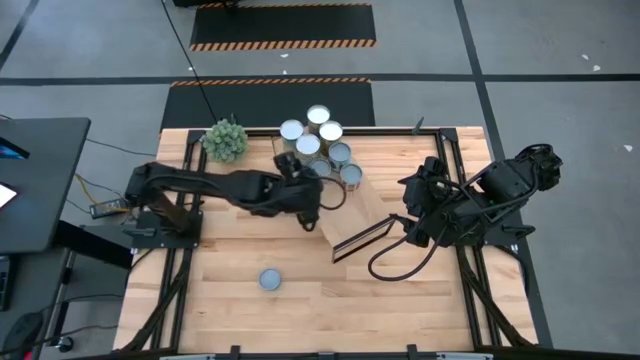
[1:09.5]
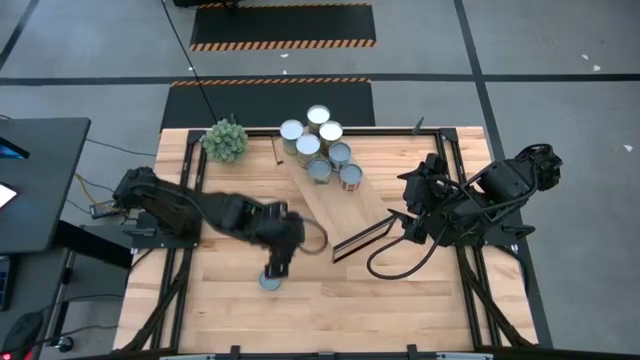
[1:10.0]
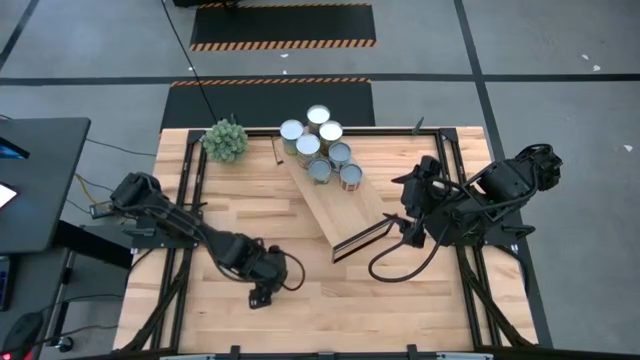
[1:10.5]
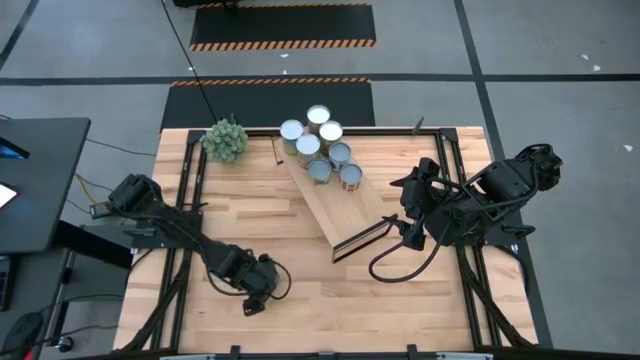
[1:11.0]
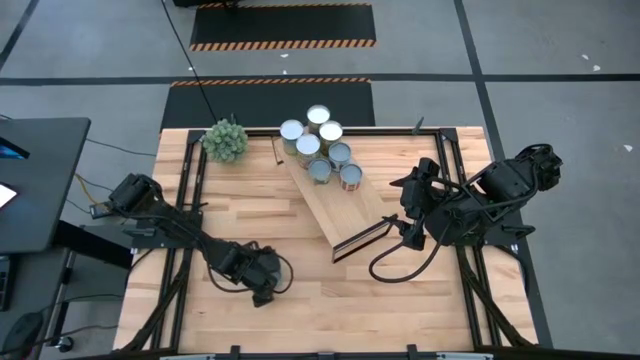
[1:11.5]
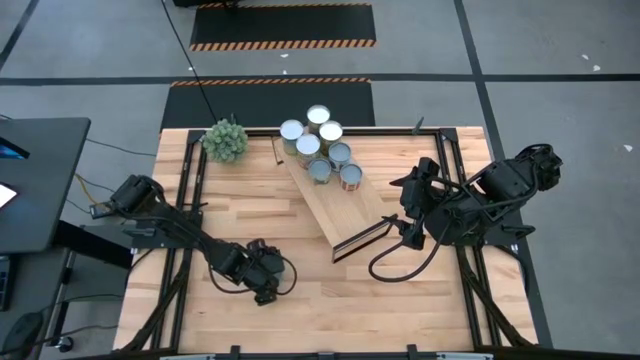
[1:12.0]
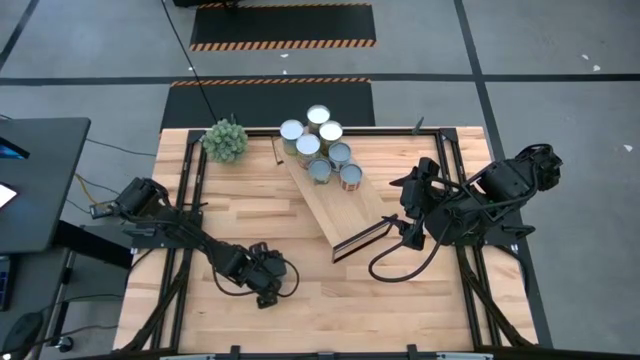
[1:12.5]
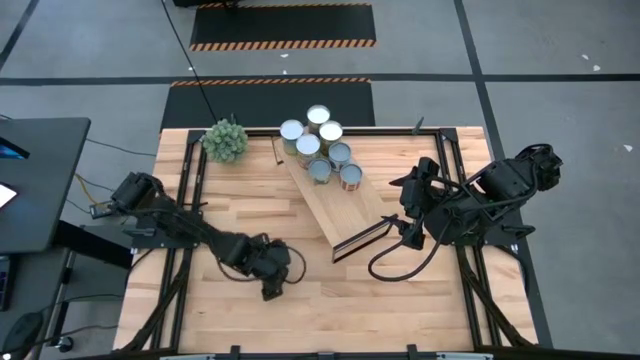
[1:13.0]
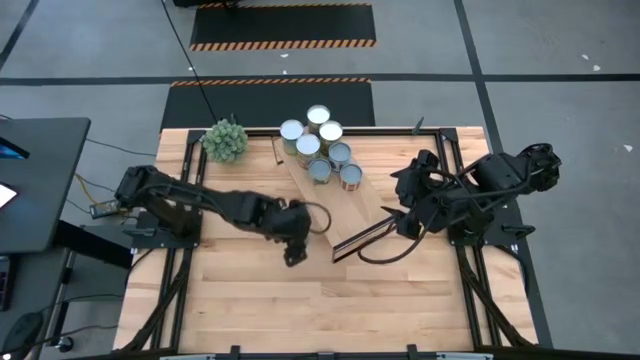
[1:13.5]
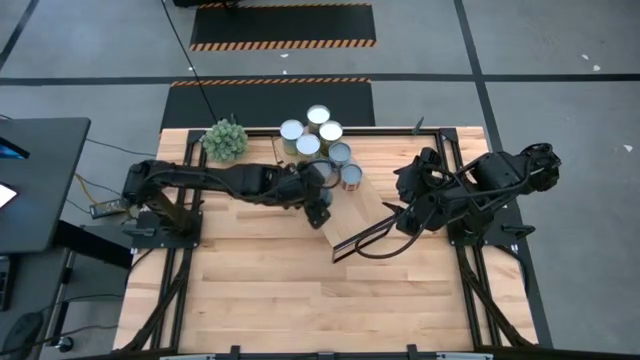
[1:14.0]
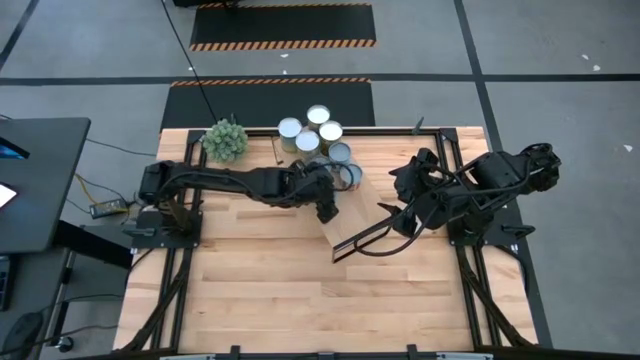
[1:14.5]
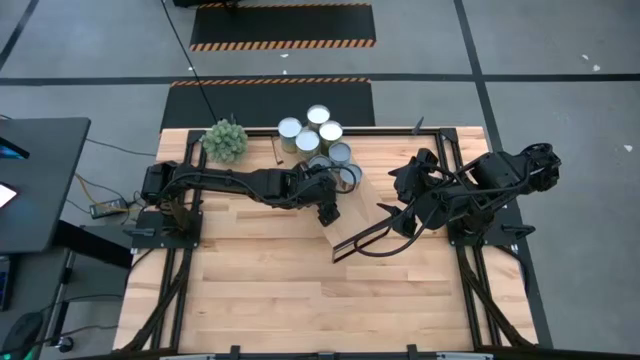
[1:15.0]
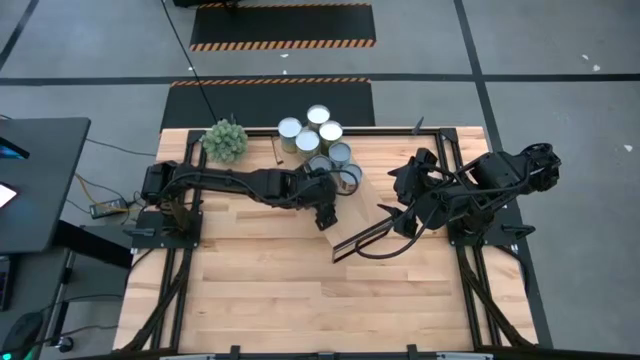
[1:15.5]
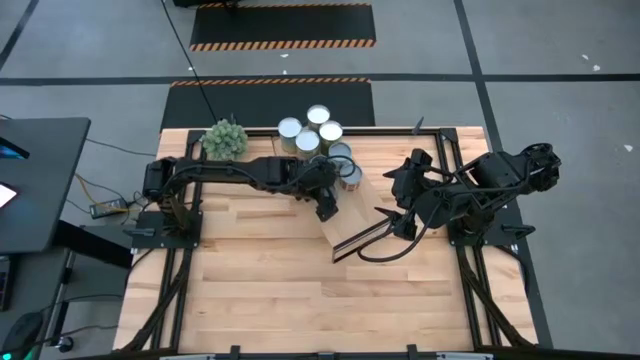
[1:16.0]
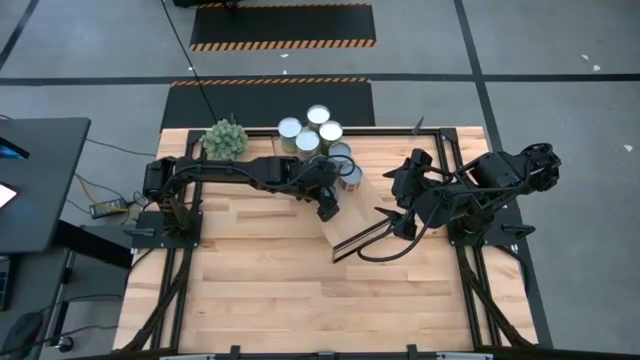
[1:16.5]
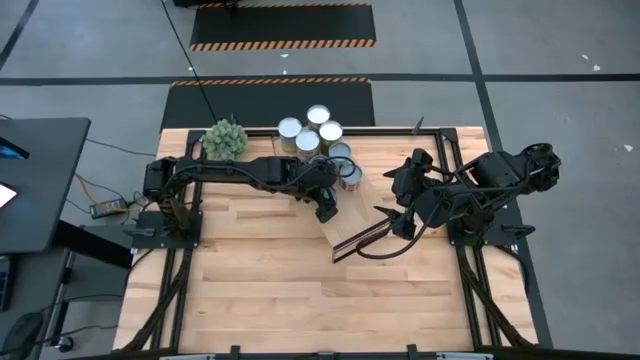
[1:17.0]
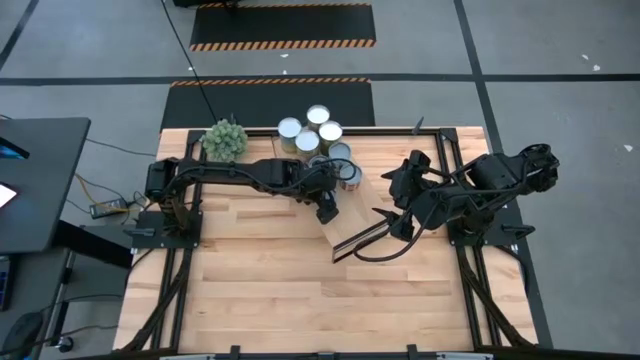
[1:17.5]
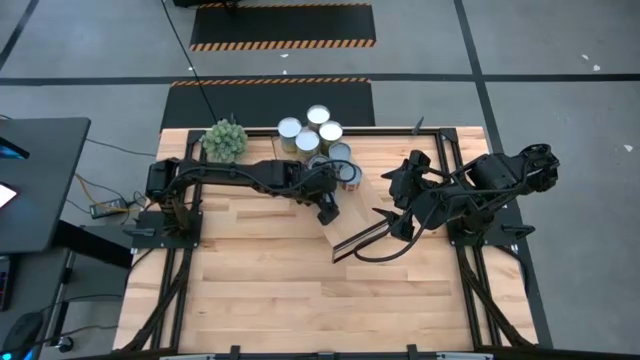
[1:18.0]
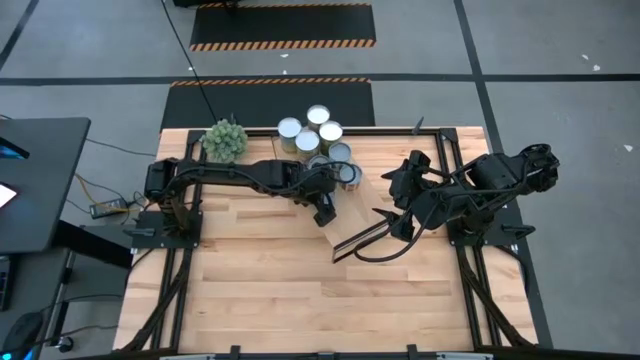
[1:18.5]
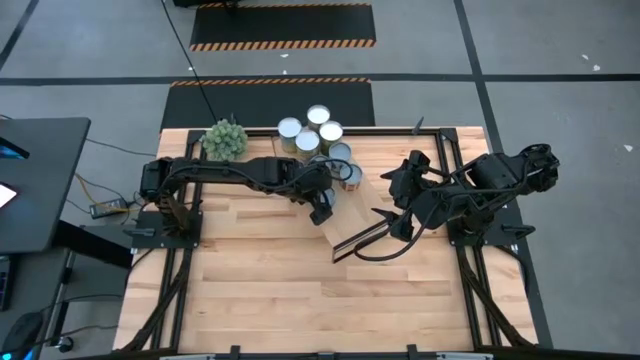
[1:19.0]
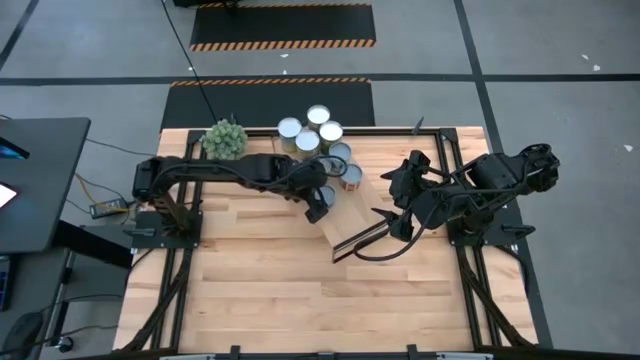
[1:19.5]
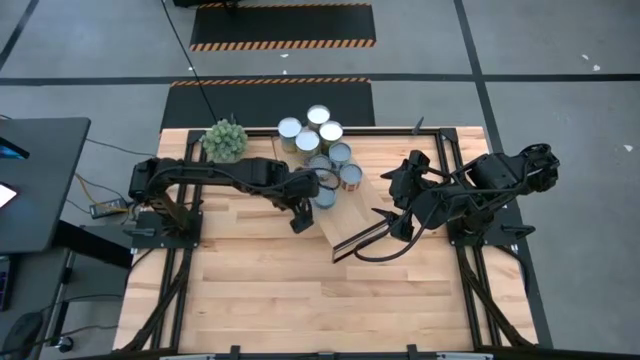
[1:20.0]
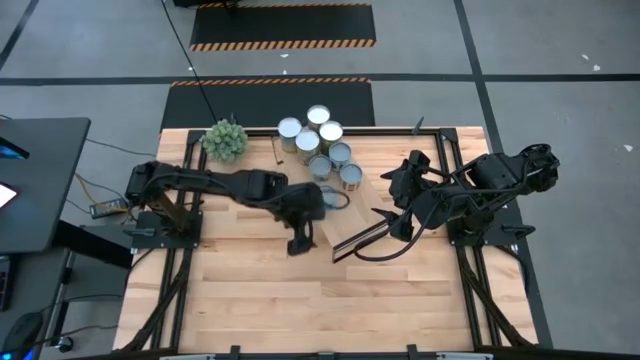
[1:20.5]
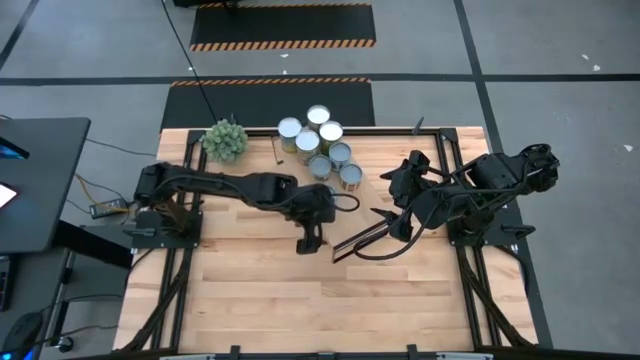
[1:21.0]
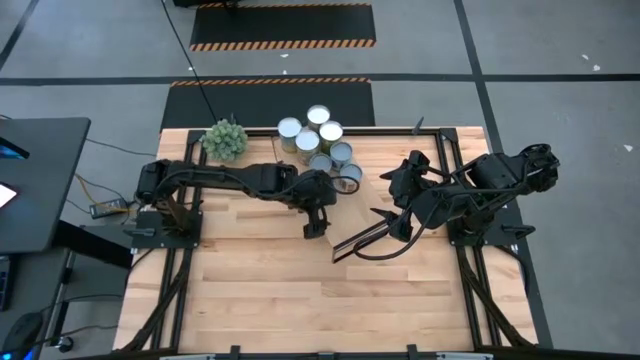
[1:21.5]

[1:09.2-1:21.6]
Task: Pick and place cans onto a shelf
Put the blue tuna can on the shelf

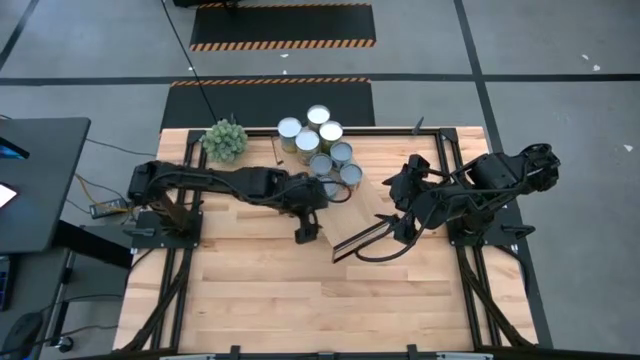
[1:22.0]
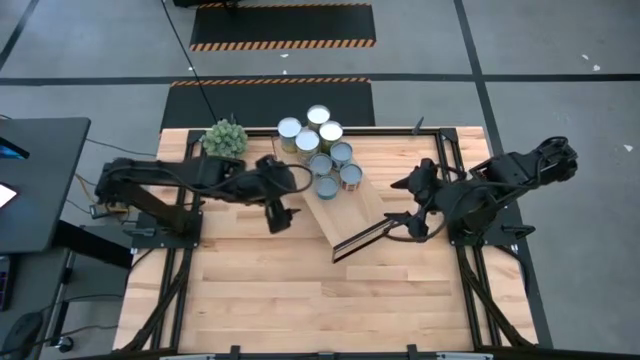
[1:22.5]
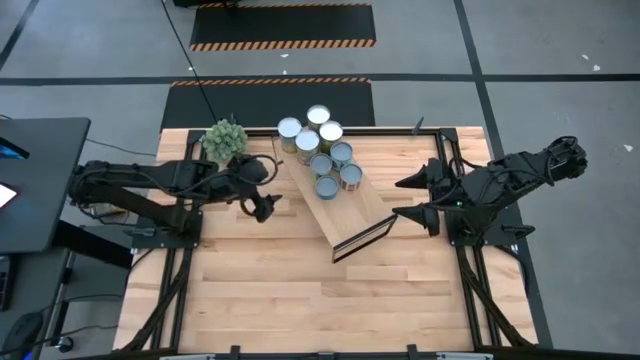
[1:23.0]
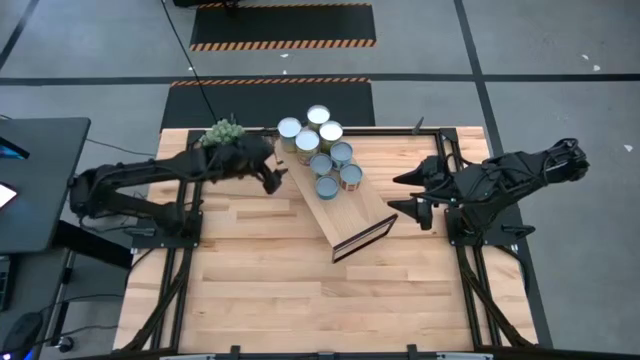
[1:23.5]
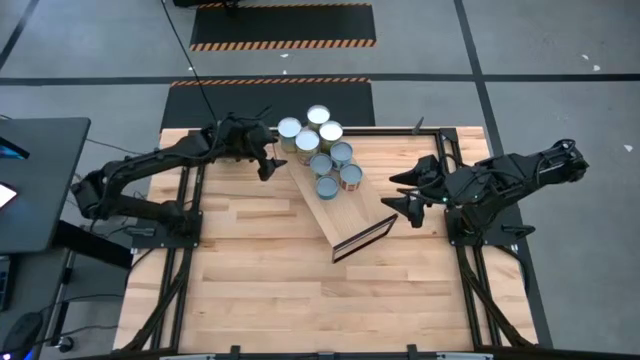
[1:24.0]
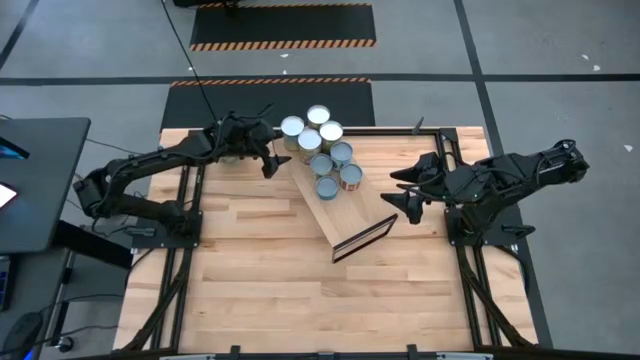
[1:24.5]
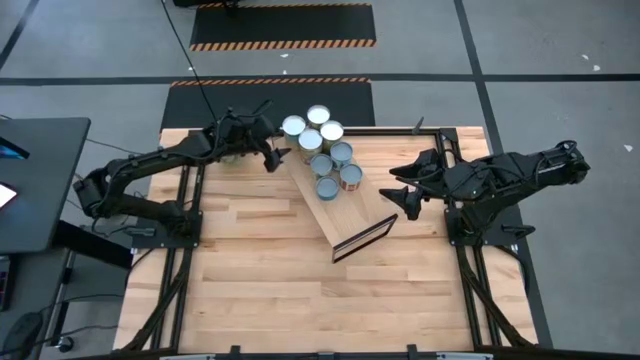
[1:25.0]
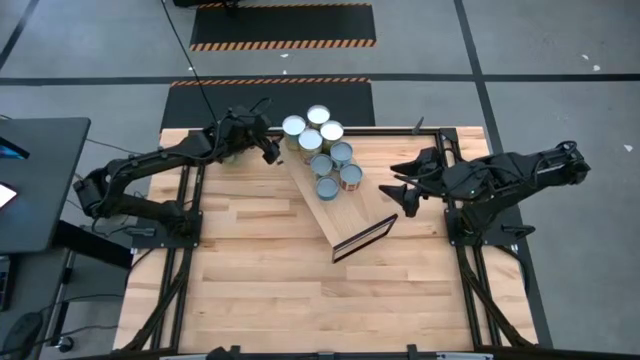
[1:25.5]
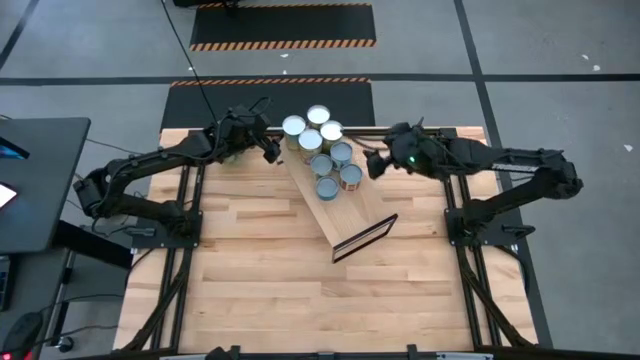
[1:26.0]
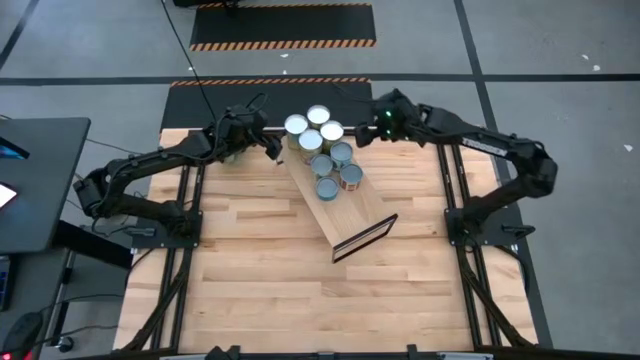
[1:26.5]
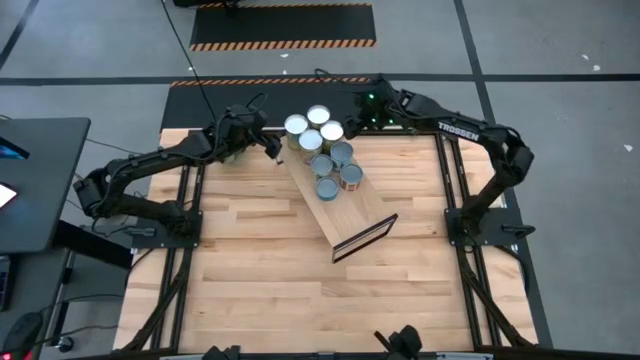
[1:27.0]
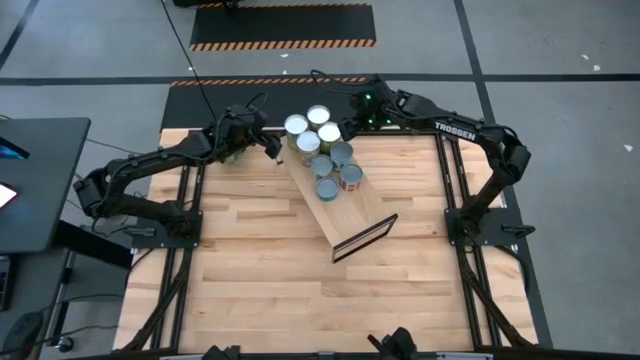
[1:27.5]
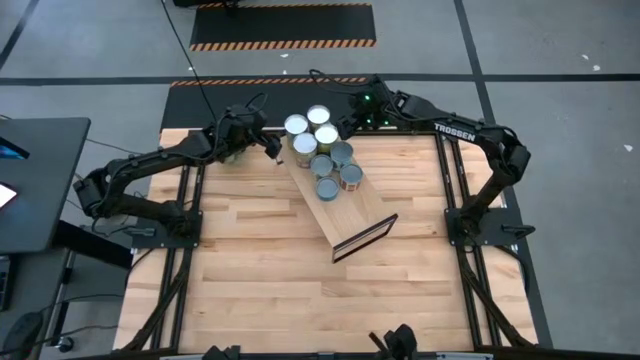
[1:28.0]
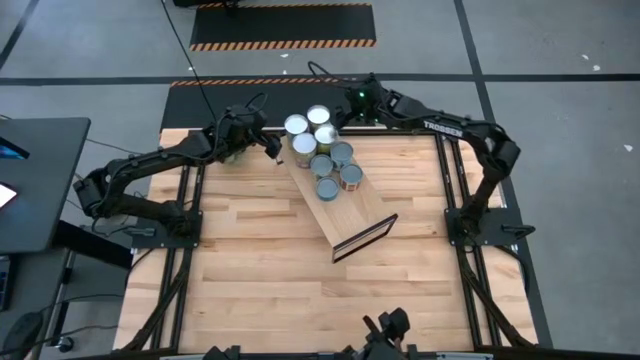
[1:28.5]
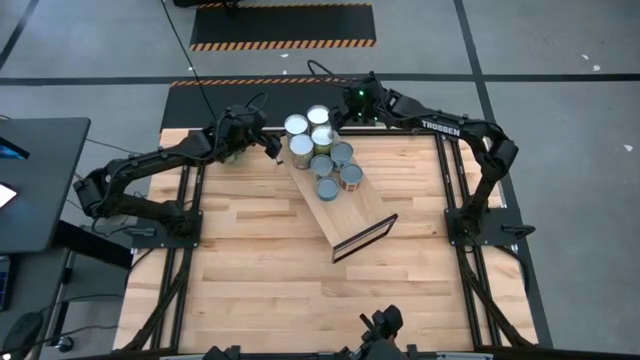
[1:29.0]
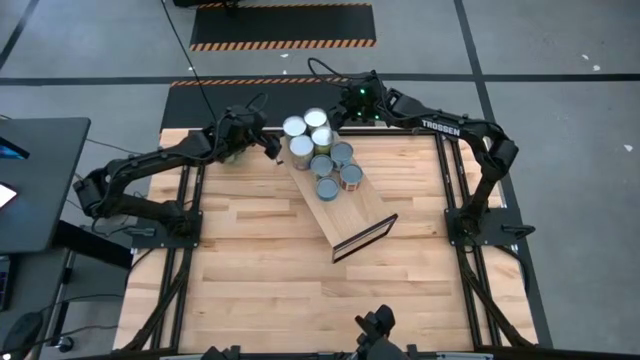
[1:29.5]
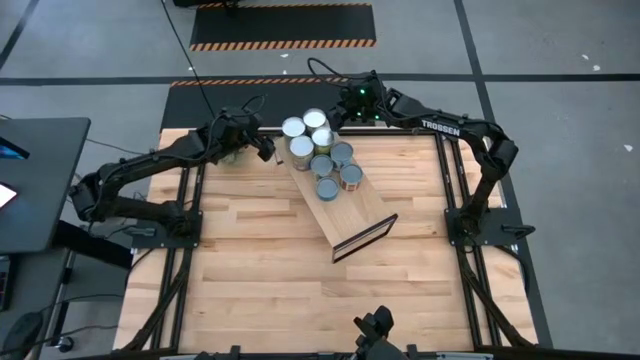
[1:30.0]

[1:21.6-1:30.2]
Adjust the cans on the shelf to align them
